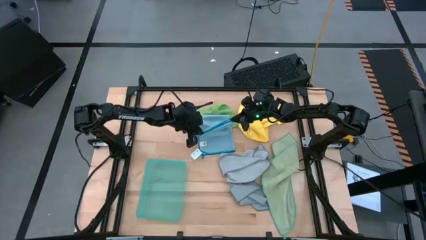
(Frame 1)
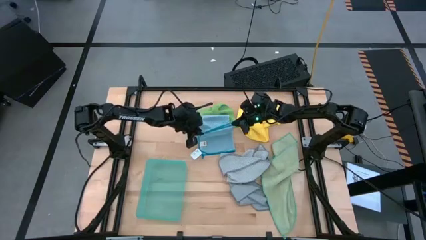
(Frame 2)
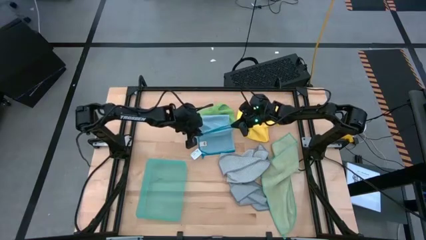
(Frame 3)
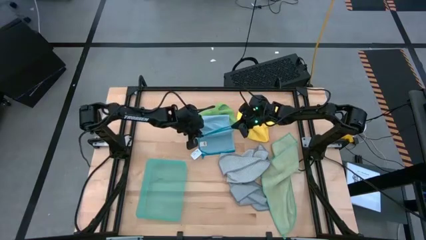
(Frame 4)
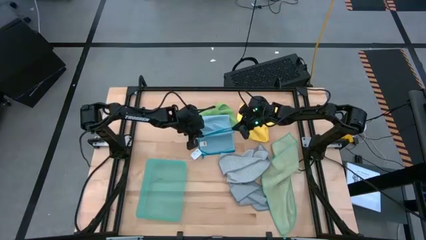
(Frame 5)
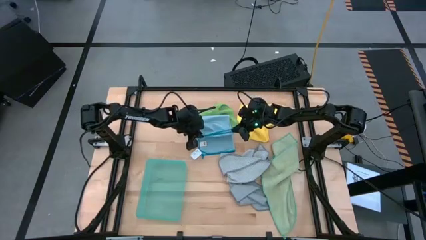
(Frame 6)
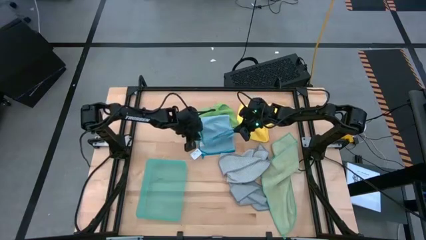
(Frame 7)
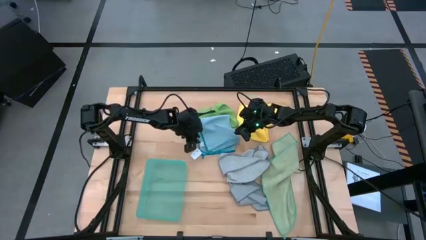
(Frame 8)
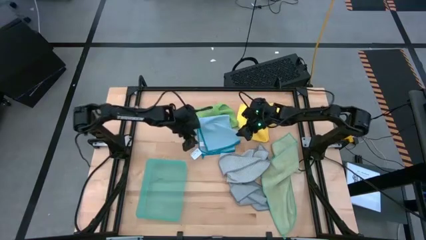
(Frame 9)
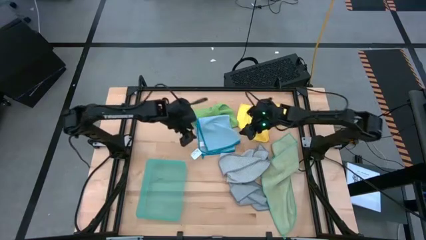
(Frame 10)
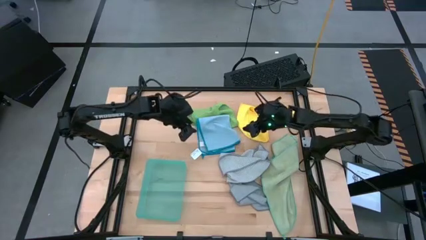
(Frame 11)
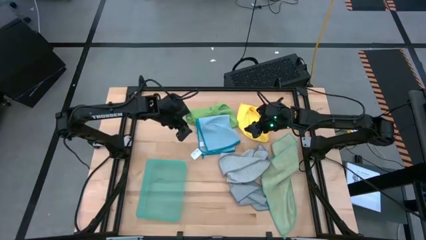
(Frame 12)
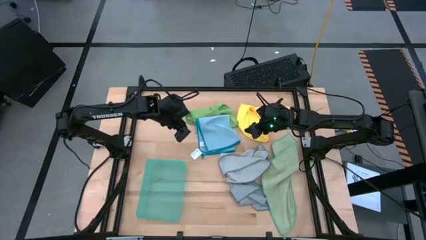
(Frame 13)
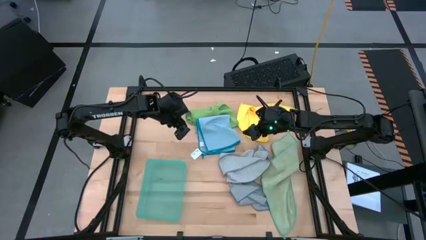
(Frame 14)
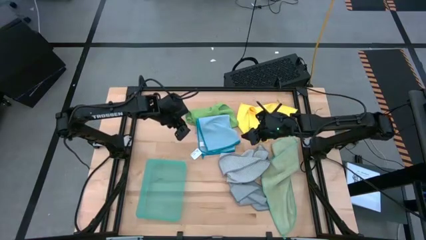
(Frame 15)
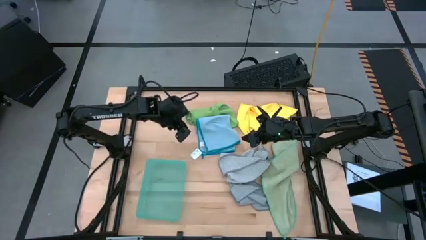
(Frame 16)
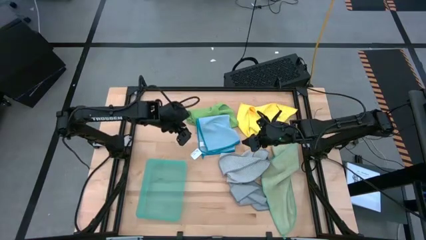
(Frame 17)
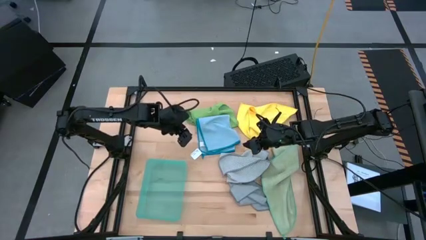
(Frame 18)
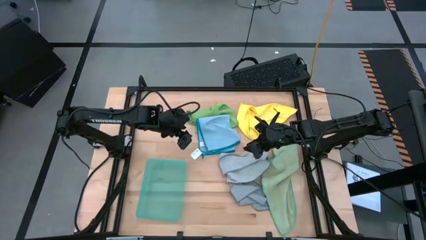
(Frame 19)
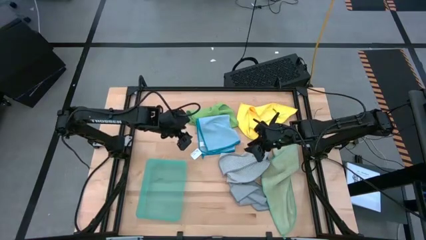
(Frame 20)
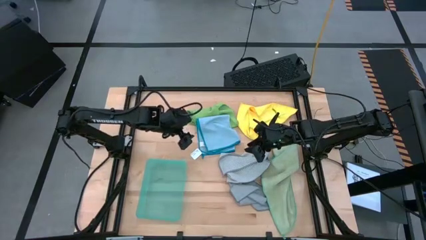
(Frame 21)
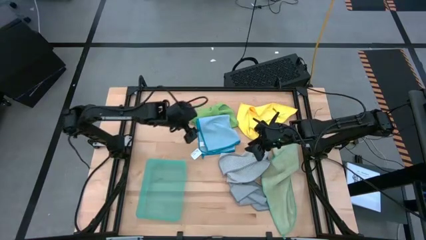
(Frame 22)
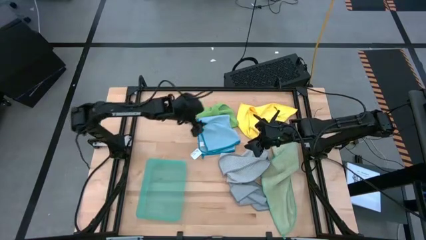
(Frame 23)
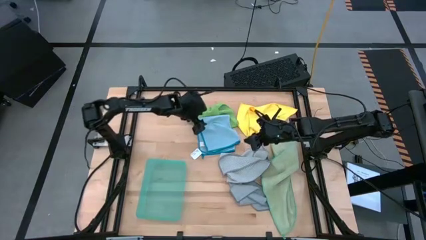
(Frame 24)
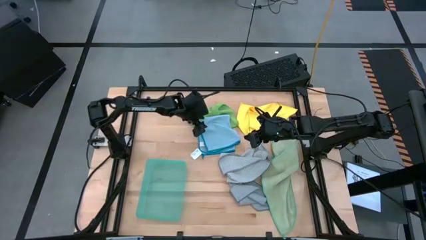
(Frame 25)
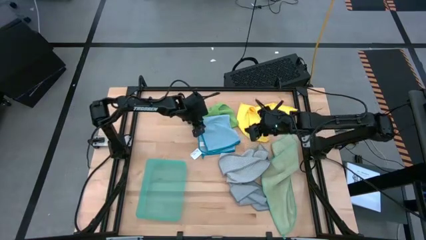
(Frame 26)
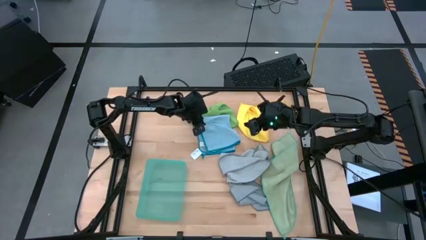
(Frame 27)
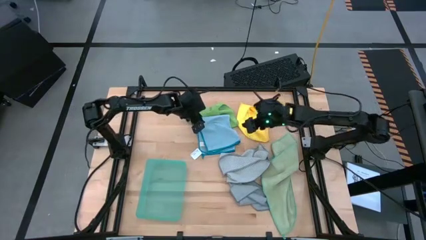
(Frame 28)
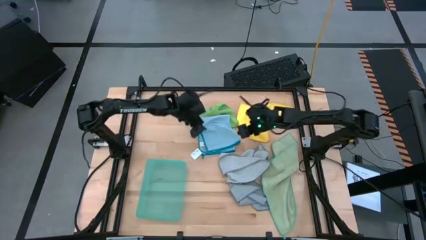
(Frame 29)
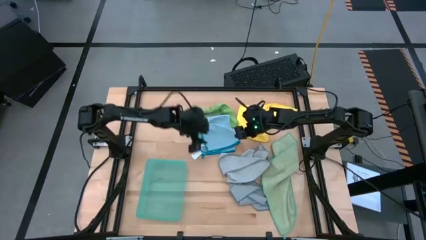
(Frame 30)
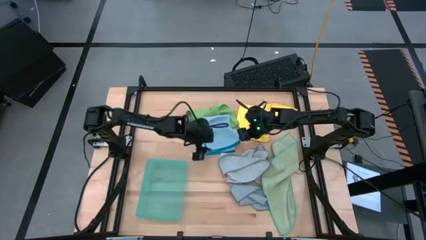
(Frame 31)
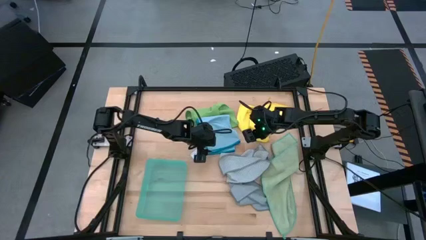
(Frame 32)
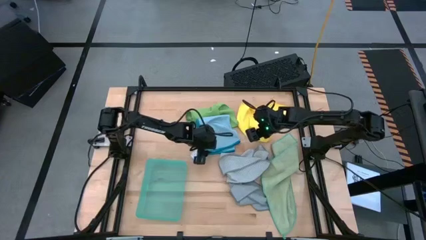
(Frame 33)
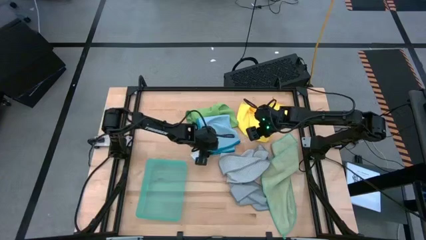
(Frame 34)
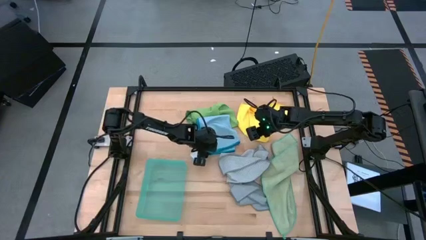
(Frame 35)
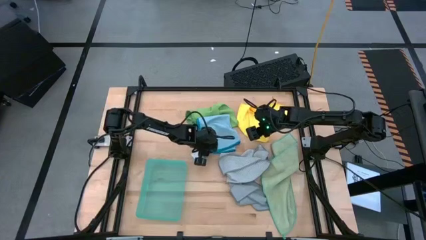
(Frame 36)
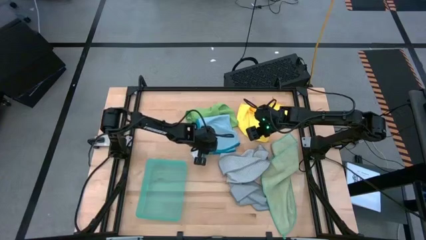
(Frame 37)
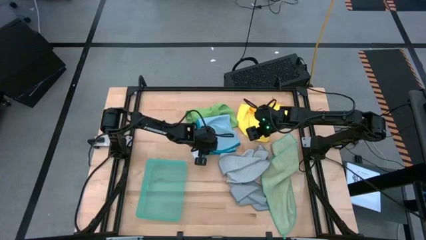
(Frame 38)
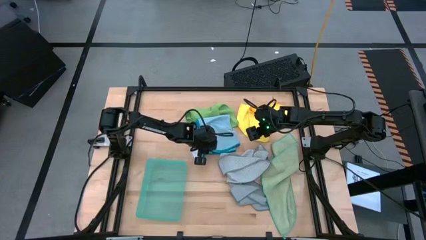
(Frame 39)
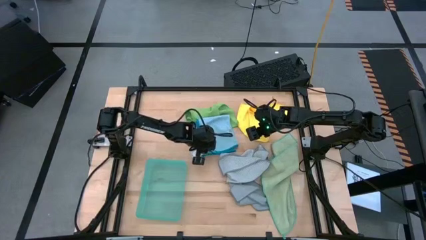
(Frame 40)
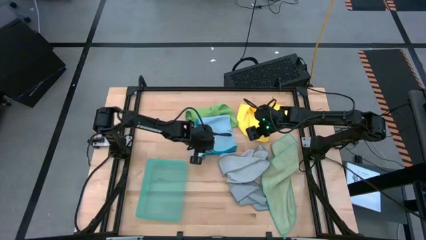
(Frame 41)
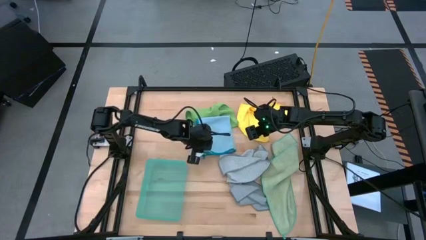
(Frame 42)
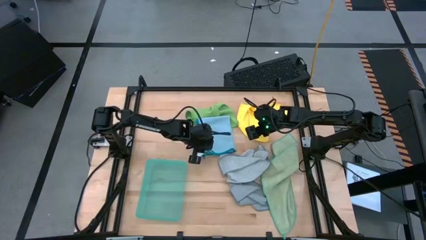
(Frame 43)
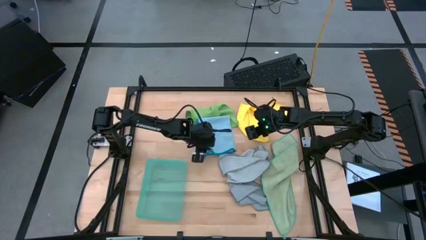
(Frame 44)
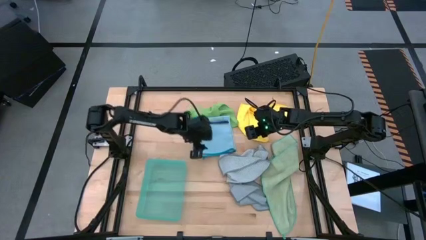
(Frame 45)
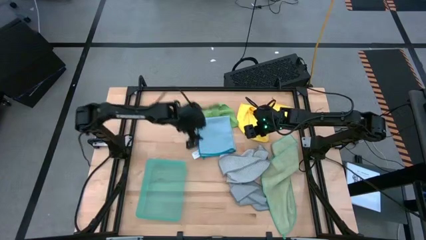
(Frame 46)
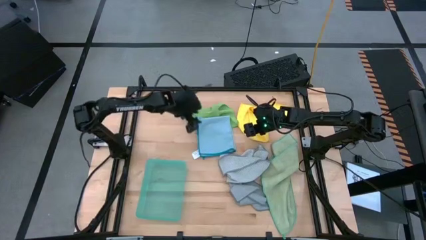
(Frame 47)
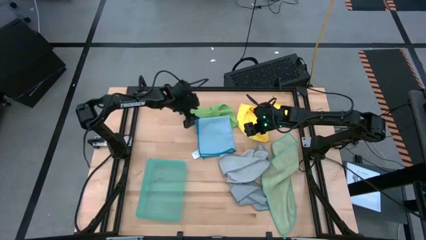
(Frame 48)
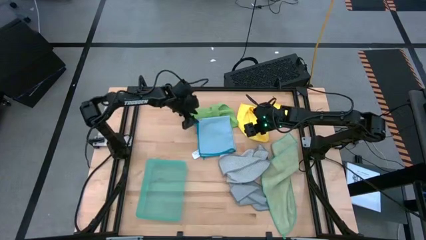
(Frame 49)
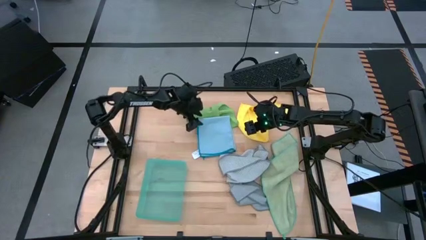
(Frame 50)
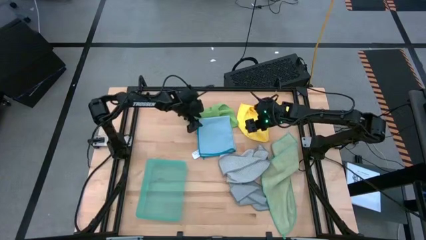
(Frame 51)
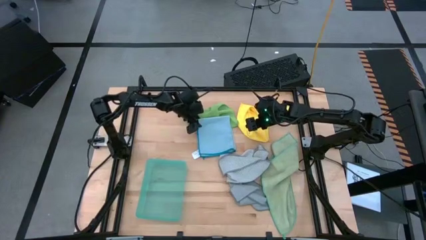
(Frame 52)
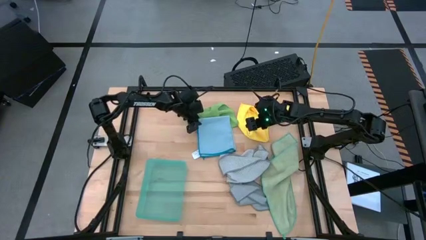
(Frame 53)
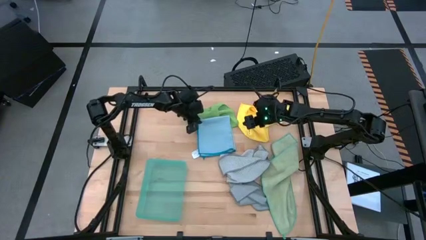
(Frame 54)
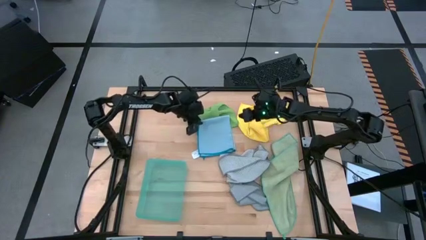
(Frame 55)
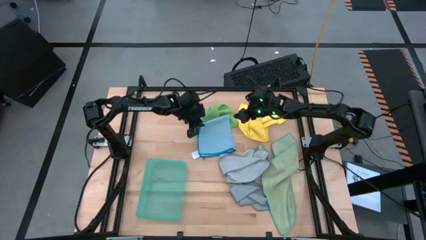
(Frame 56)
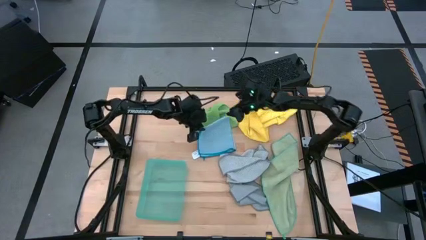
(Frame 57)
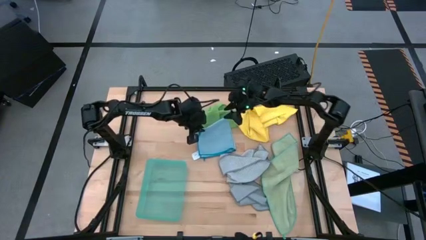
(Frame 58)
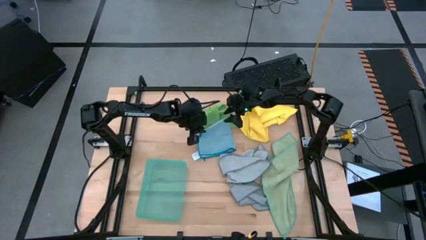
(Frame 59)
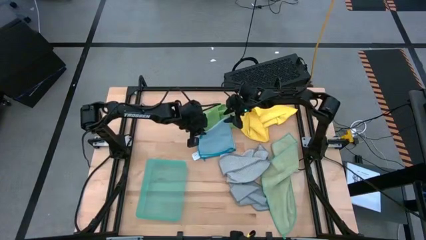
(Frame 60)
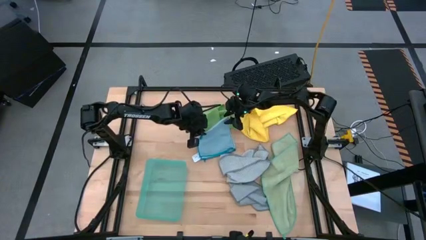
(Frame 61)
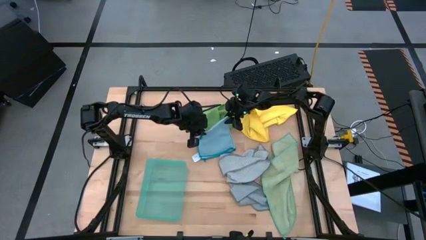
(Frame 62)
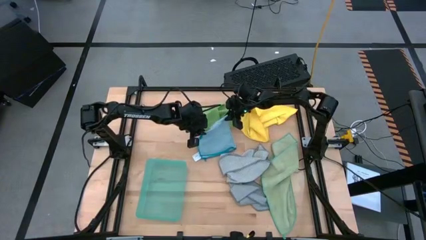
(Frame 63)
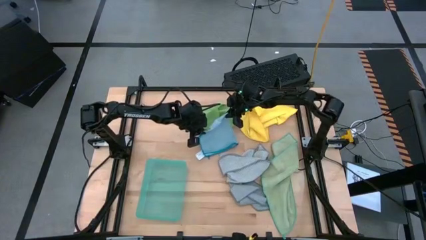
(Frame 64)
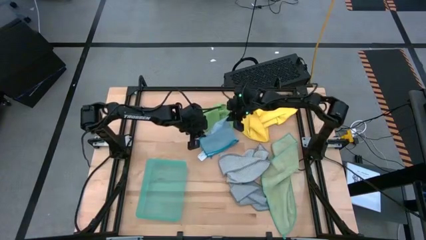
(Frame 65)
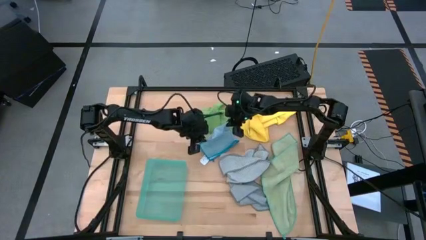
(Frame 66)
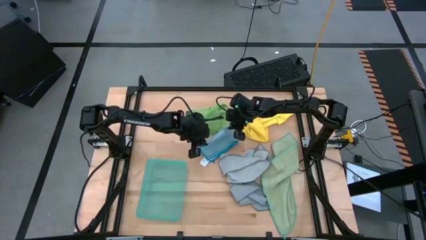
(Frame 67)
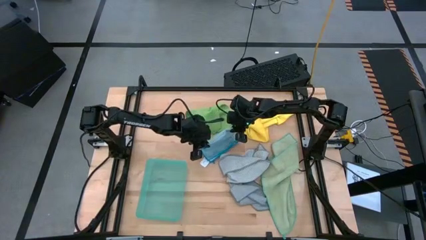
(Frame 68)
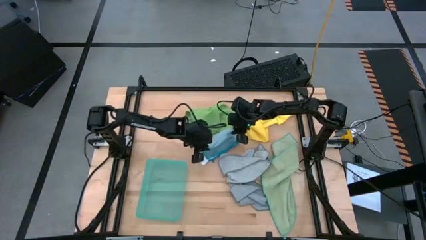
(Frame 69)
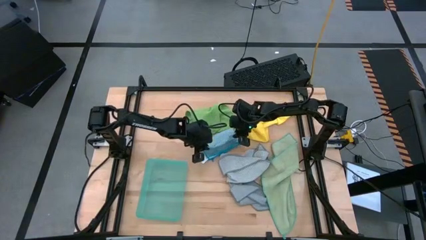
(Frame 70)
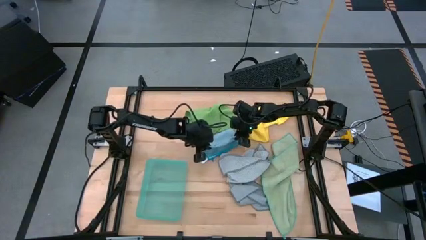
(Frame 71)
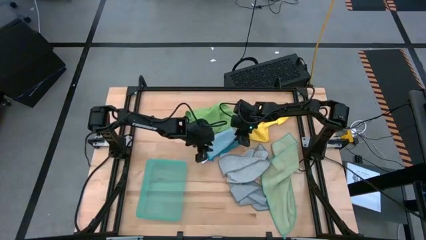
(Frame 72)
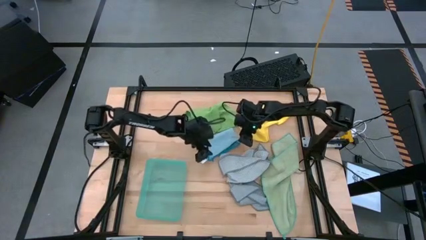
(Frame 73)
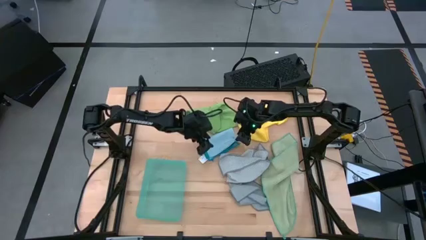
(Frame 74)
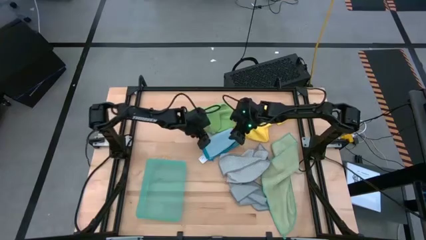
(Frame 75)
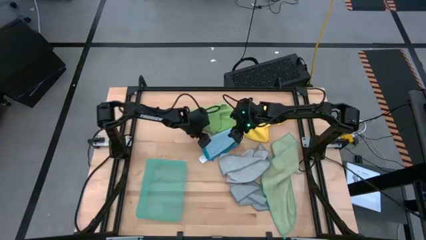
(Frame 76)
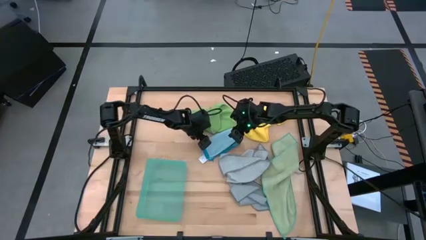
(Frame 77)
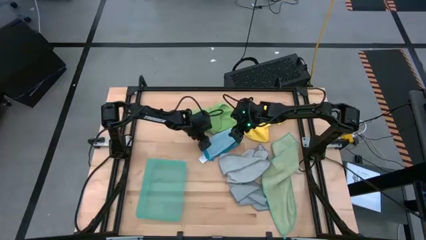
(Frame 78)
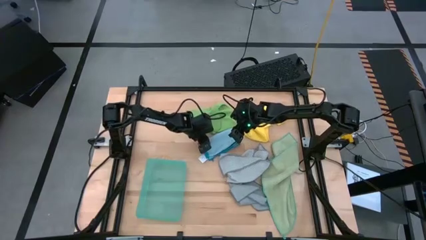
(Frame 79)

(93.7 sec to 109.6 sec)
Task: Fold microfiber towels
Fold the blue microfiber cloth

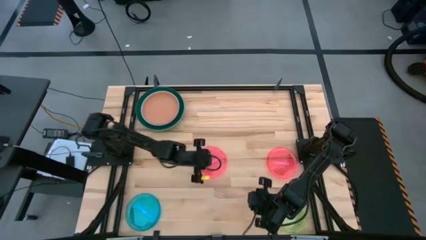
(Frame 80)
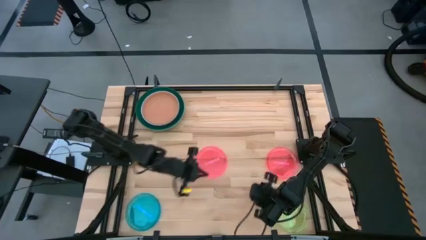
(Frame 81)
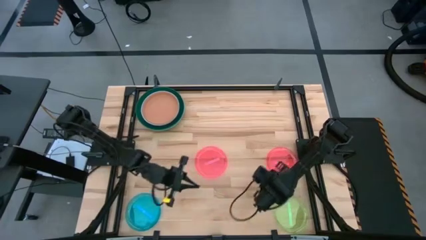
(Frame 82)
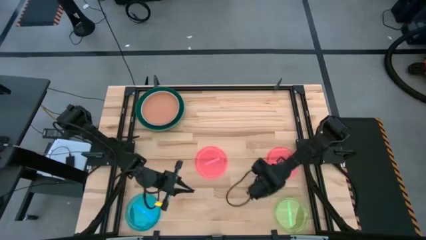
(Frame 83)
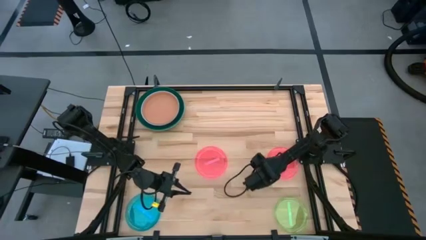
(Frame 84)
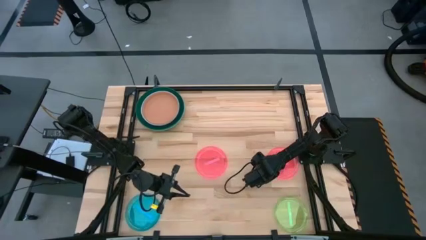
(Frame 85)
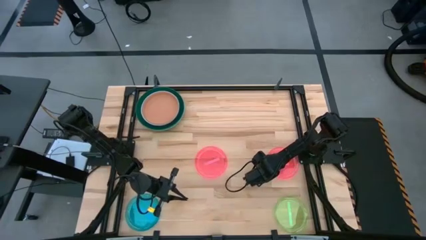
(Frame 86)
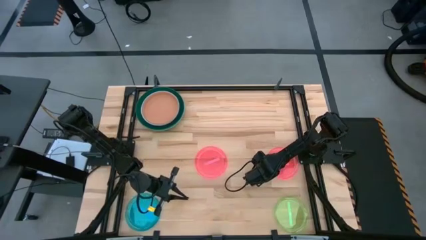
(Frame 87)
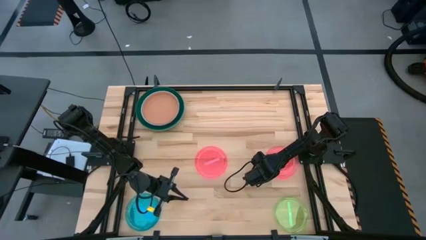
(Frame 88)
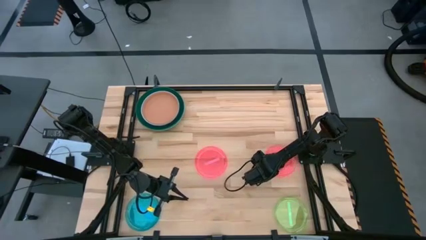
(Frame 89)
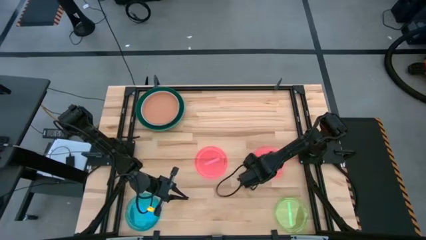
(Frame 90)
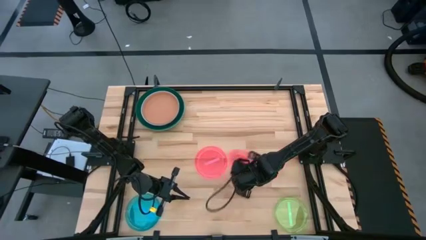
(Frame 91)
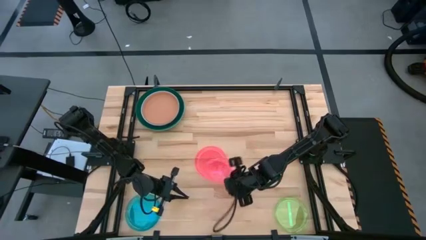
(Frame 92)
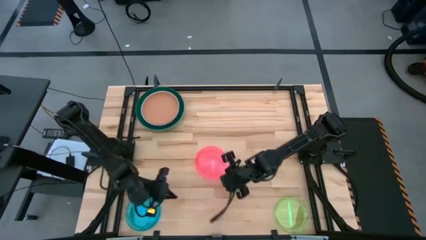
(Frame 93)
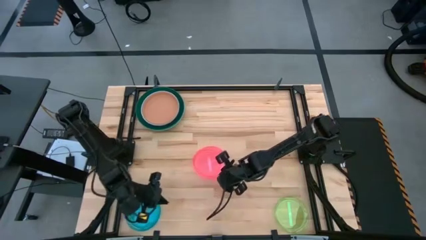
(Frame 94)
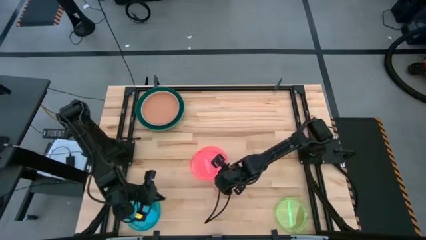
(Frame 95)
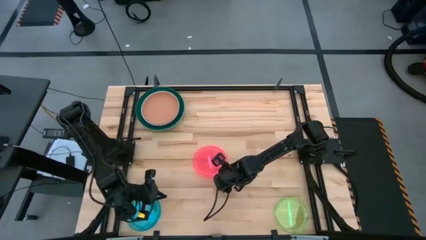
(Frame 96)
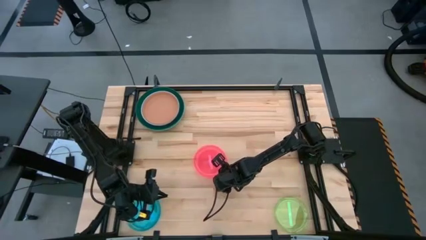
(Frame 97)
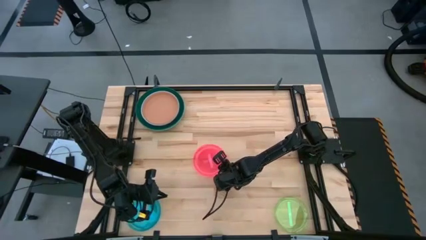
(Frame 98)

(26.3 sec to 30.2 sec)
Task: Stack plastic plates
Stack the right pink plate on top of the left pink plate
